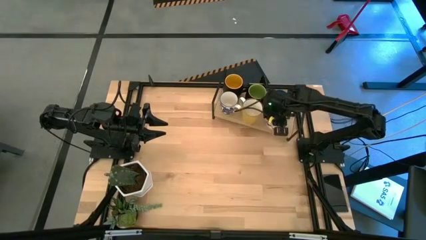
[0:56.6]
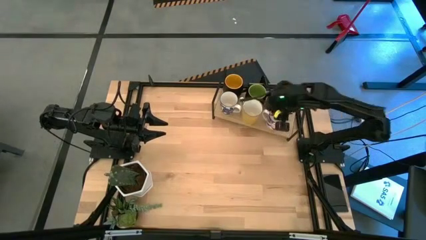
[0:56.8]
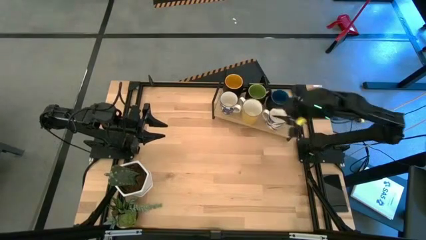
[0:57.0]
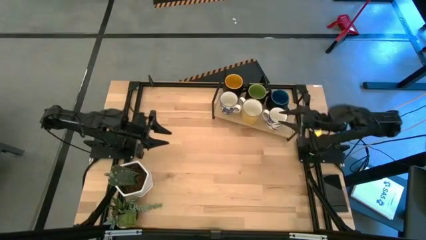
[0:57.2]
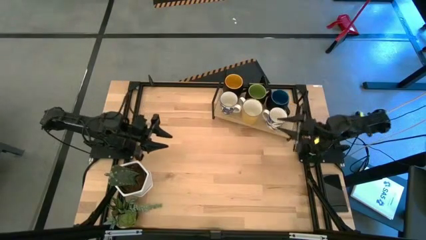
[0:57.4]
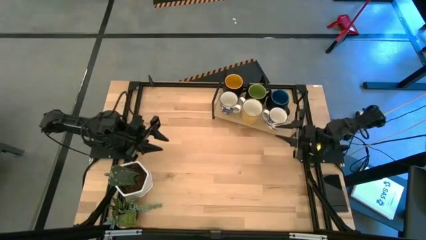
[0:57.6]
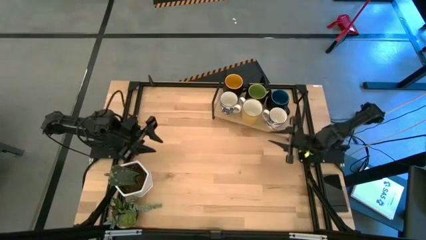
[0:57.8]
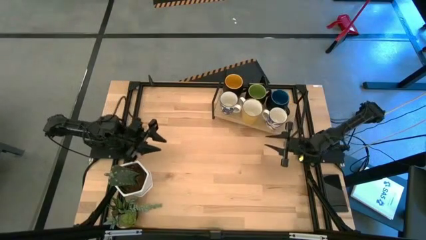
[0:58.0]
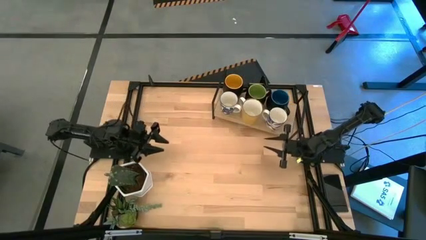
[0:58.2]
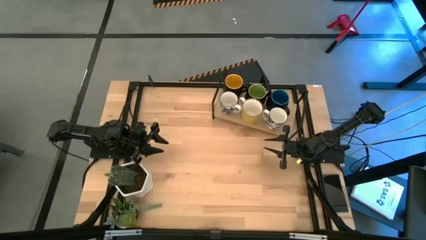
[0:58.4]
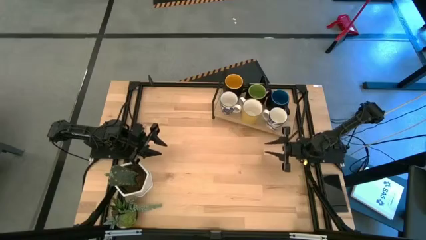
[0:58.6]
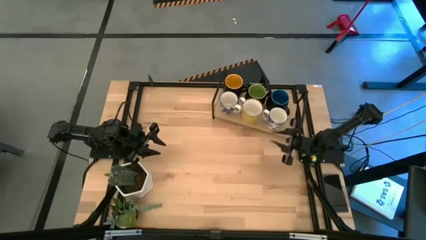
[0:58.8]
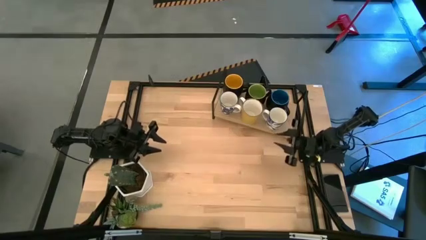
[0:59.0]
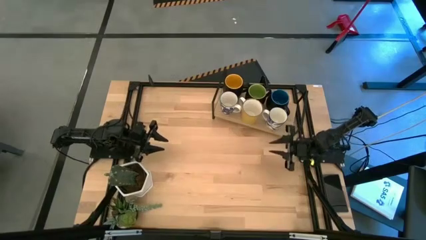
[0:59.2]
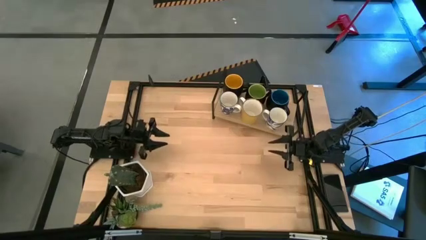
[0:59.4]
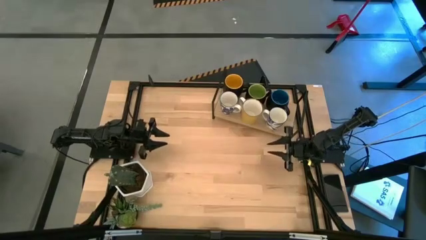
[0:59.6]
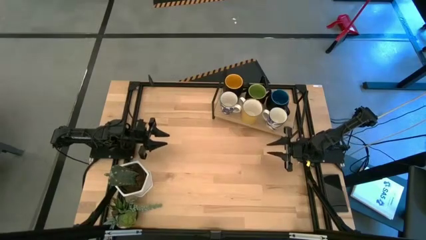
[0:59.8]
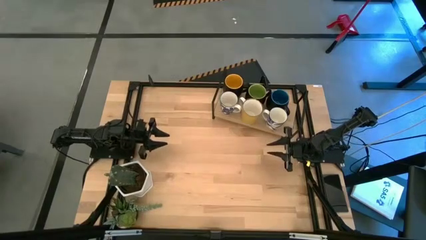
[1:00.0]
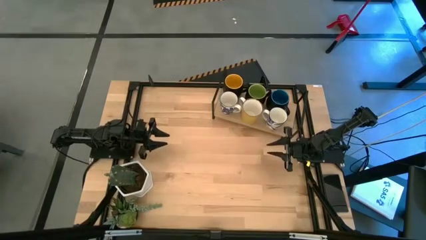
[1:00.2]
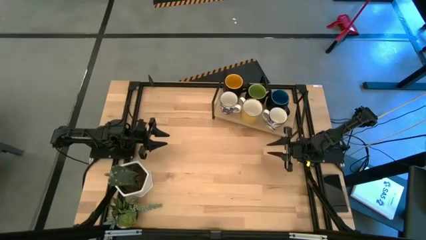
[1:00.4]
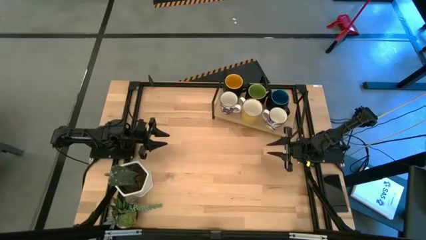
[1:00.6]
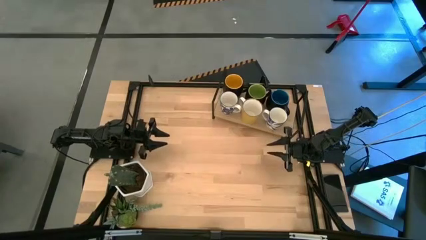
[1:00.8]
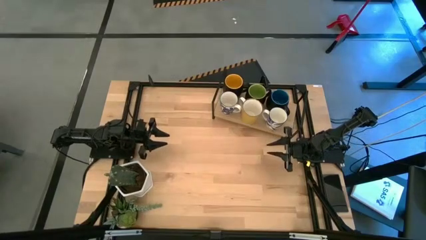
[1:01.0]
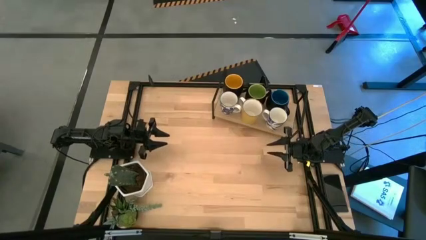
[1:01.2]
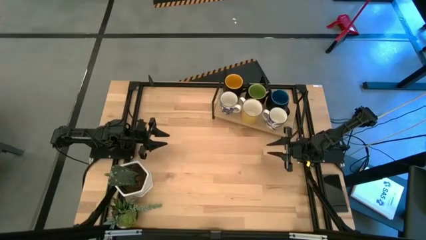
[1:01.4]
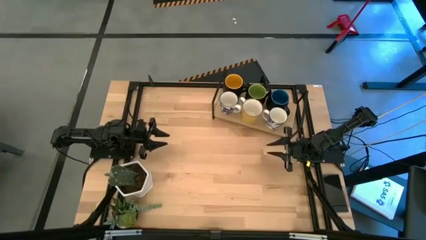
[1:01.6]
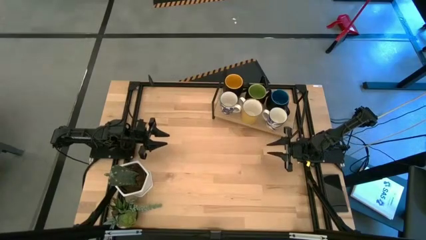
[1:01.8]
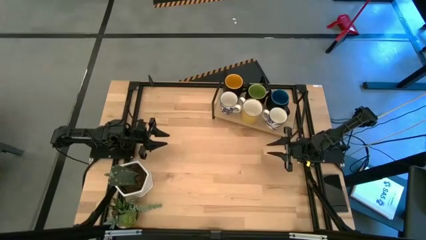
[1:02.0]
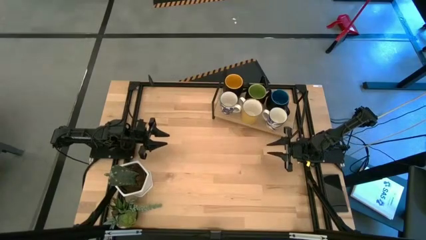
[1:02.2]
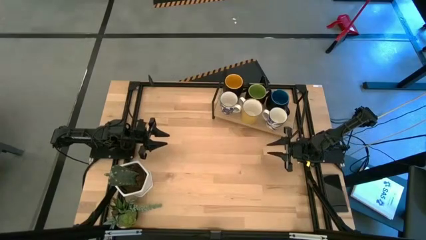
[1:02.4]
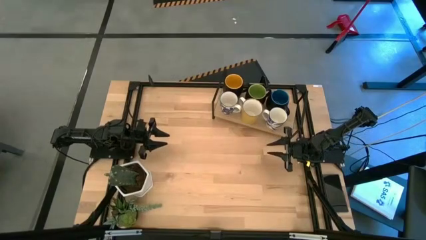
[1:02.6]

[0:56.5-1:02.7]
Task: Place coffee mugs
Return to Home Position

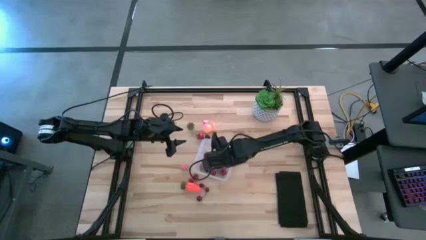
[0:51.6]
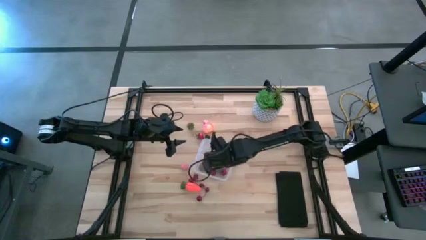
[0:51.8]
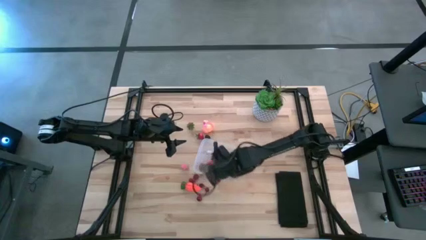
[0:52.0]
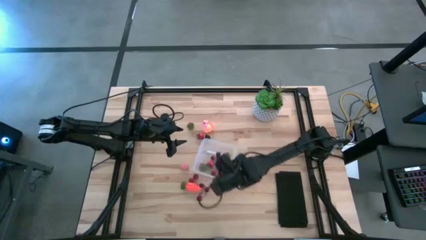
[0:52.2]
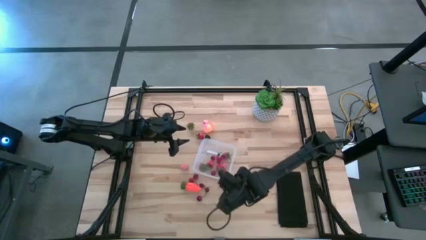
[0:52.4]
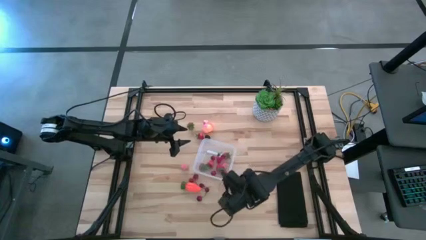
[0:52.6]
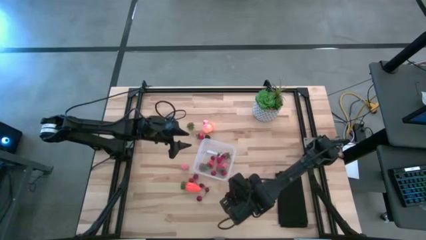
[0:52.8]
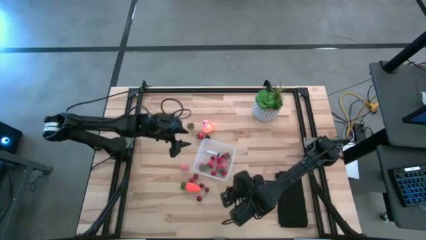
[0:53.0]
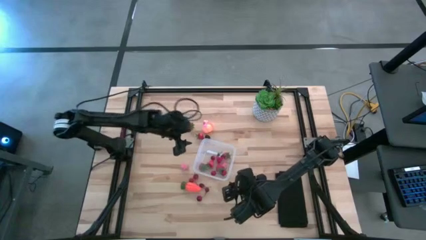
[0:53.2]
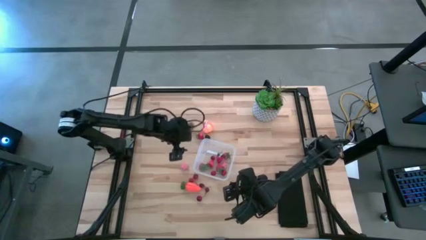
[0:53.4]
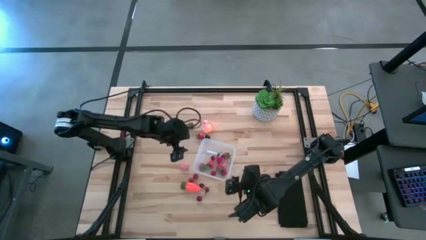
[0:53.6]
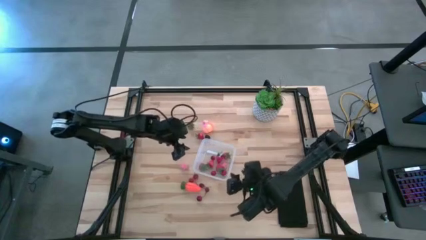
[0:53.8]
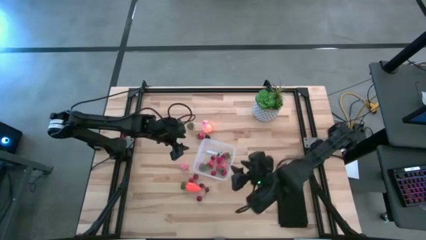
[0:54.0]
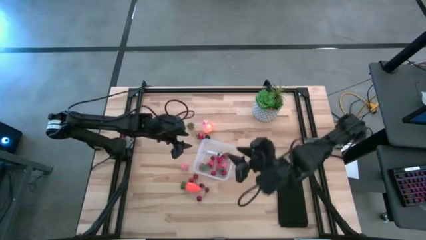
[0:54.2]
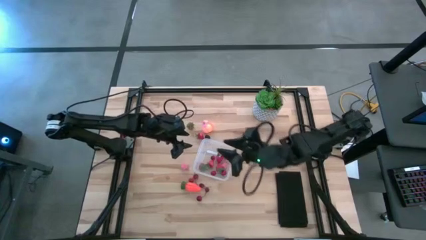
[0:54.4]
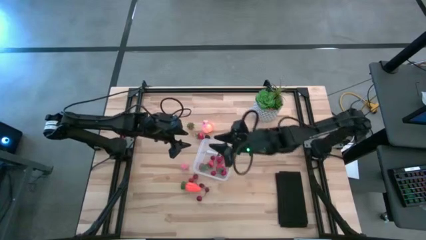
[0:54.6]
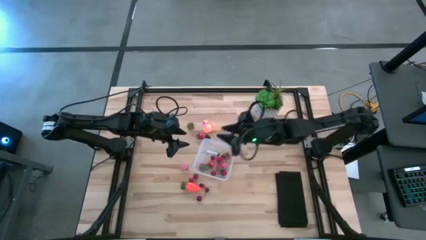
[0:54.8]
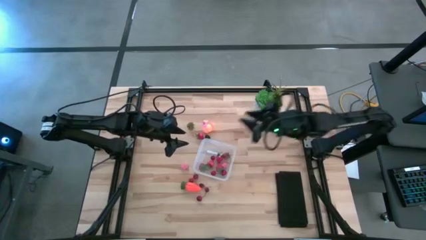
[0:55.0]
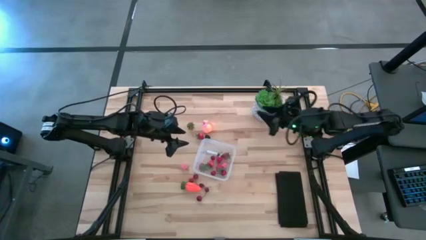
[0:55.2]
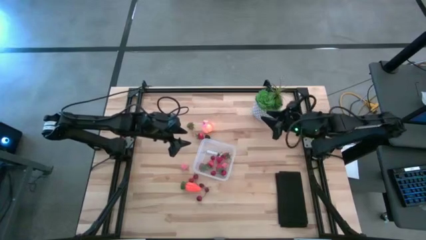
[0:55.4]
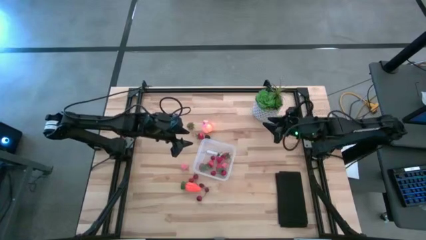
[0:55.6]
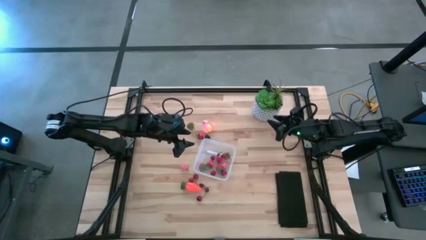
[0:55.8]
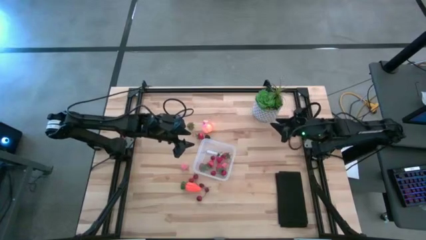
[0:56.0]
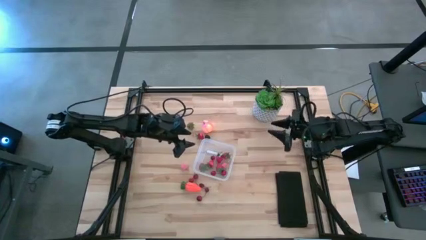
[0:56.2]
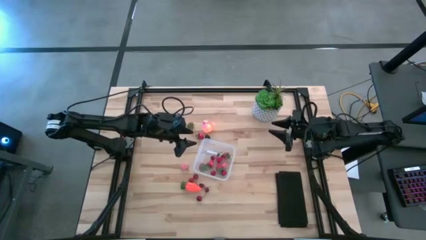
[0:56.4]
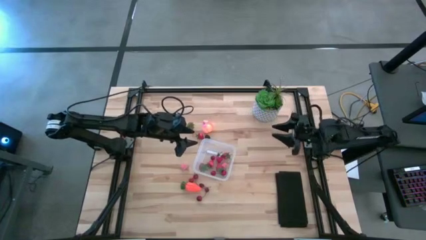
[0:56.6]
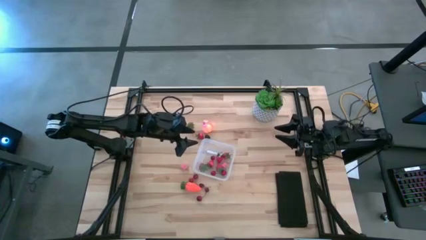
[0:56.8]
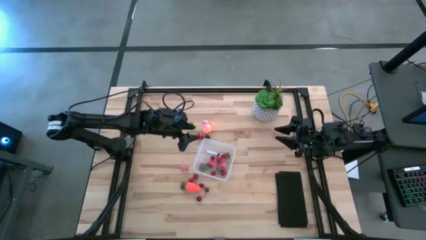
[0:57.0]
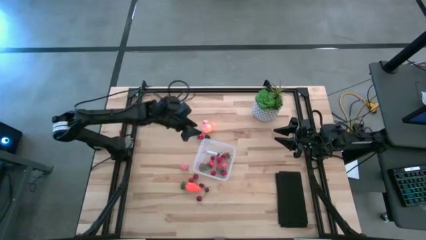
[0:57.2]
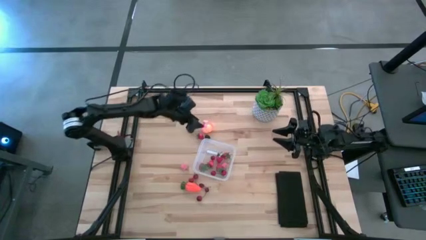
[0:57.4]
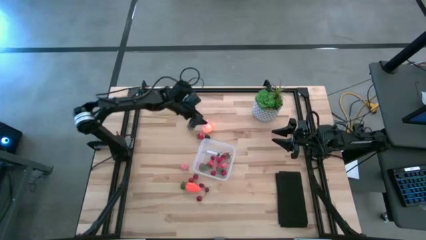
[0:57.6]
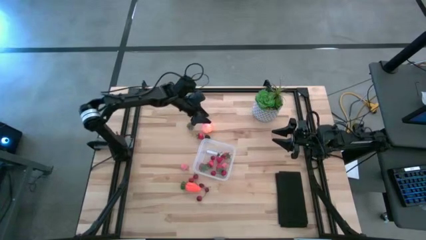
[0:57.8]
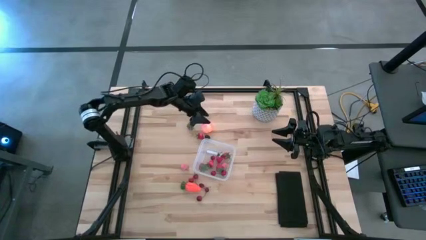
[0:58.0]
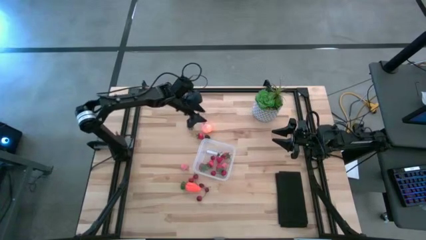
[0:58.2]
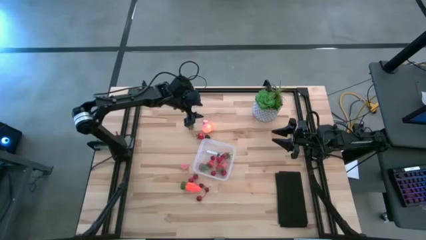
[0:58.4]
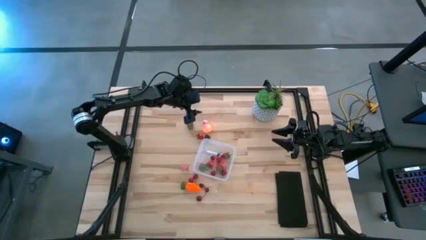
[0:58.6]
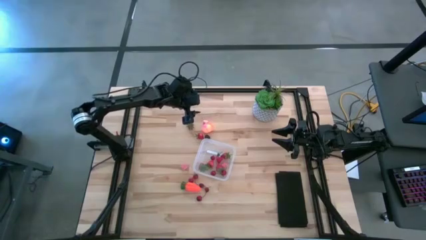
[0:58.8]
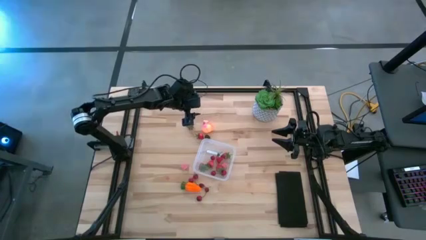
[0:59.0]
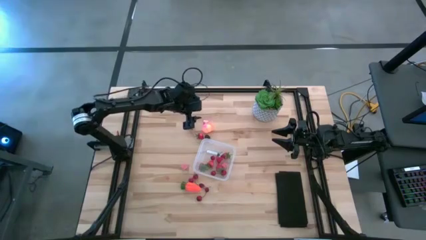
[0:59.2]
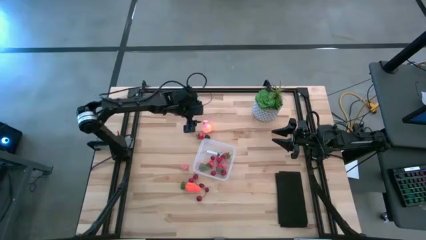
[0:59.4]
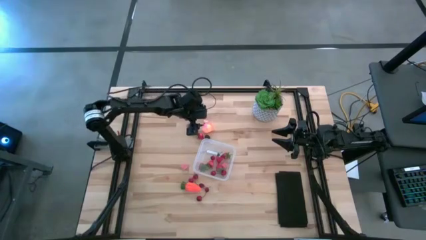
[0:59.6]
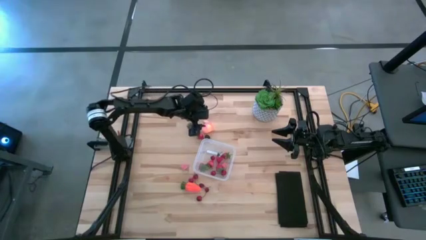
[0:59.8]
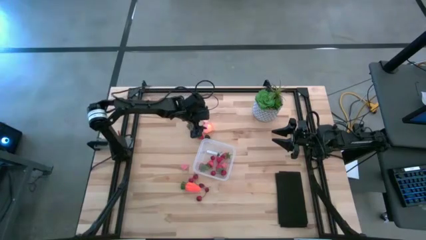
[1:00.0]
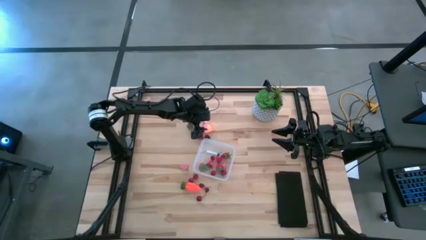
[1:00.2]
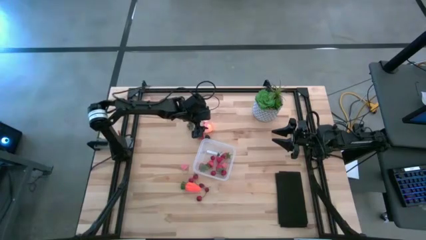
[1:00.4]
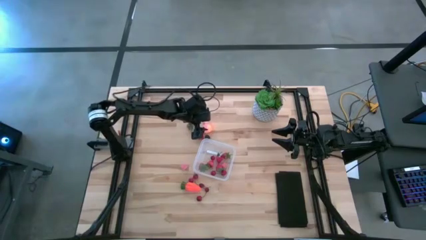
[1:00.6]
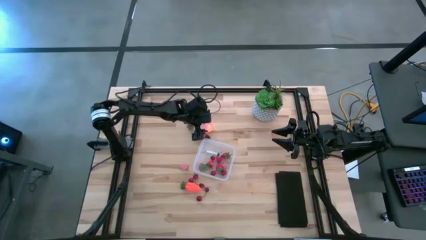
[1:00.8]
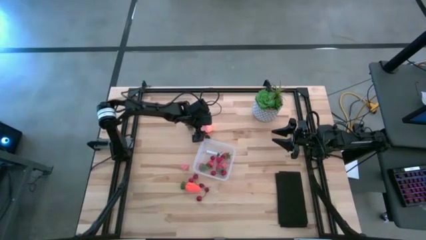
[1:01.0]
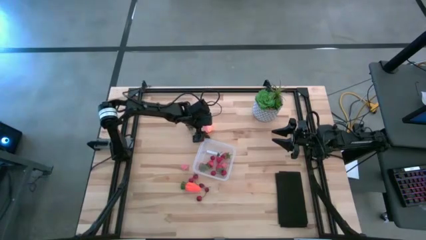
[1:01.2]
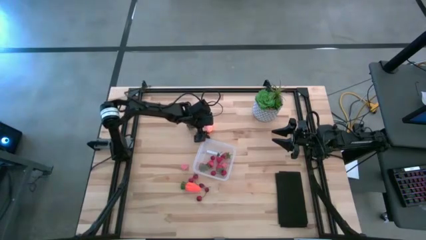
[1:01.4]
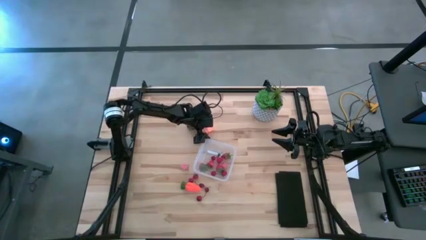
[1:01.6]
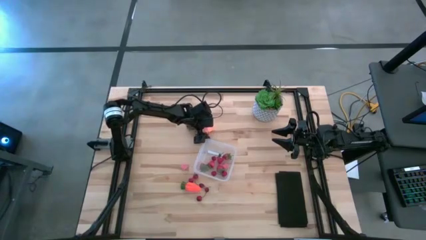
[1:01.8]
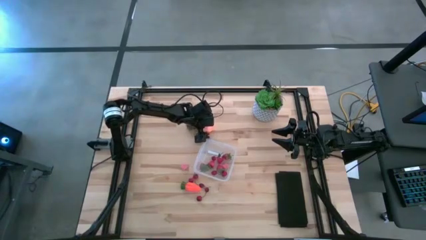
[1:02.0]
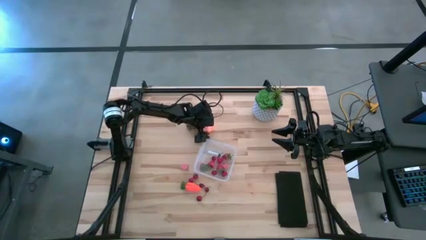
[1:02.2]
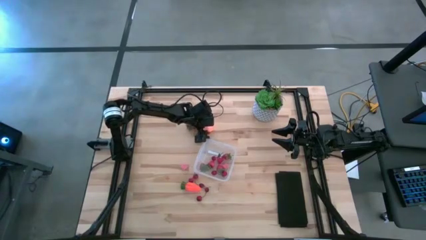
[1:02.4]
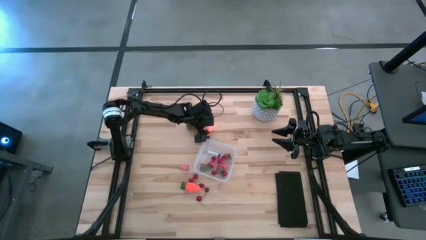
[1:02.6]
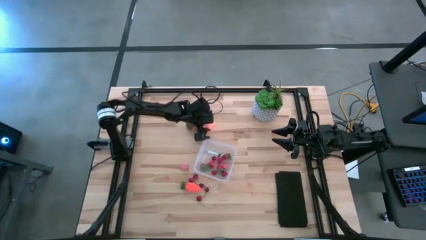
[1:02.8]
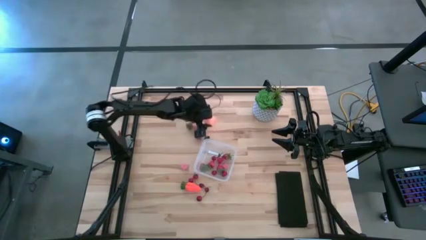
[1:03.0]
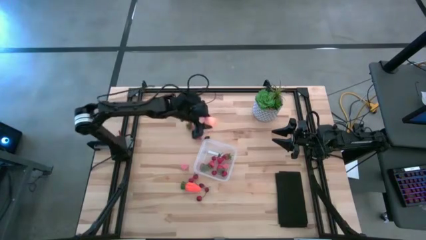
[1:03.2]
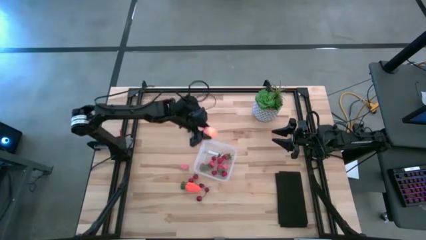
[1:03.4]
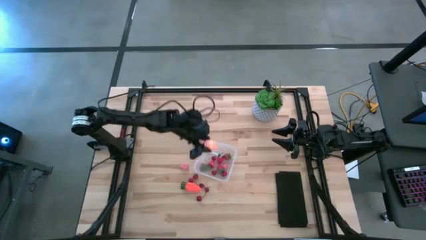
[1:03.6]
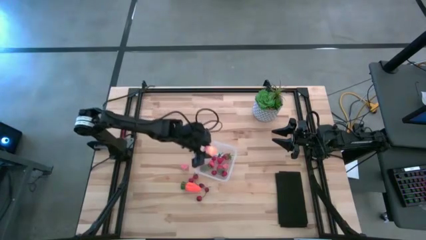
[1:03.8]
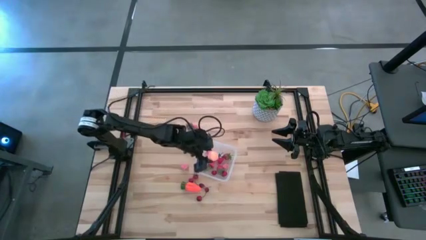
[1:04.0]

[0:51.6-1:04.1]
Task: Pick and placing Produce into tupperware
Put the pink peach into the transparent container
